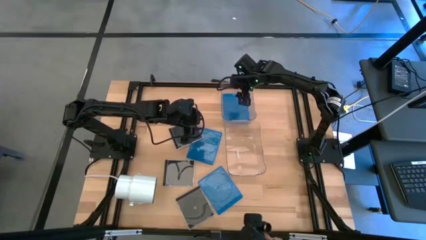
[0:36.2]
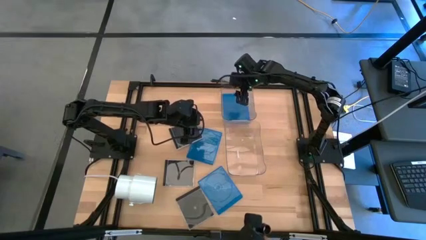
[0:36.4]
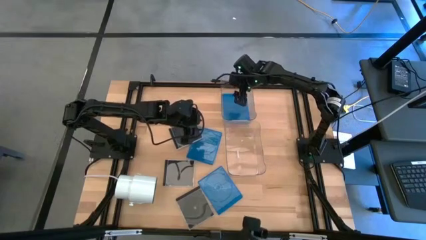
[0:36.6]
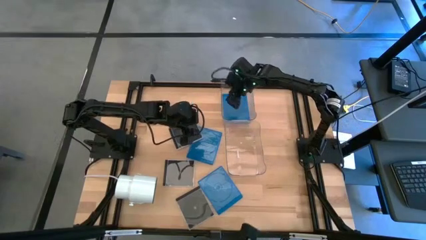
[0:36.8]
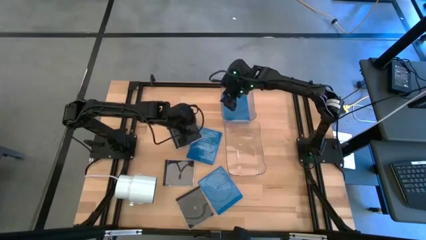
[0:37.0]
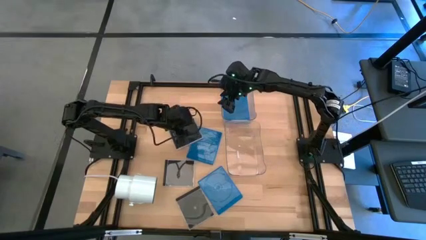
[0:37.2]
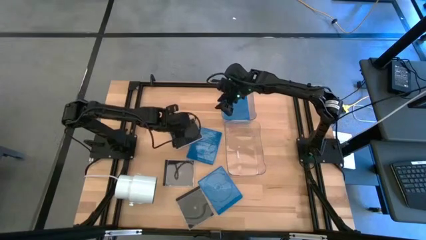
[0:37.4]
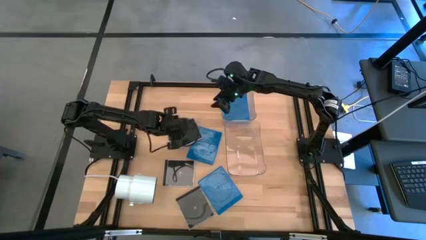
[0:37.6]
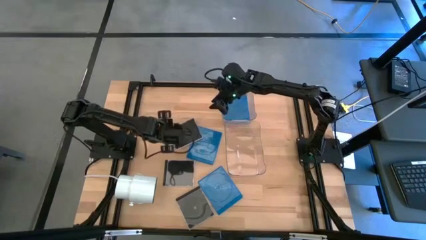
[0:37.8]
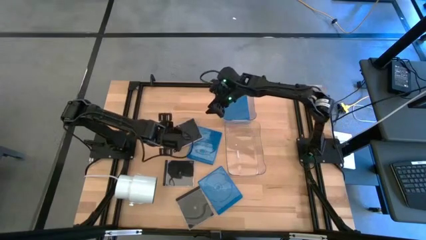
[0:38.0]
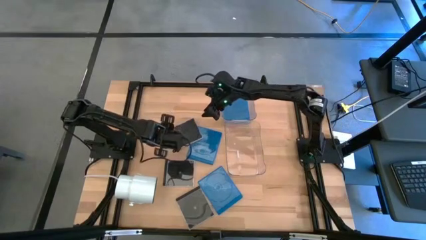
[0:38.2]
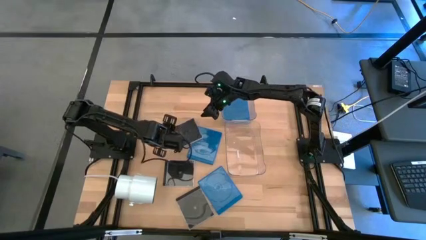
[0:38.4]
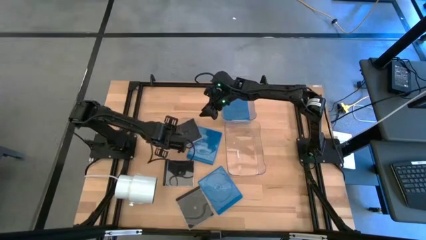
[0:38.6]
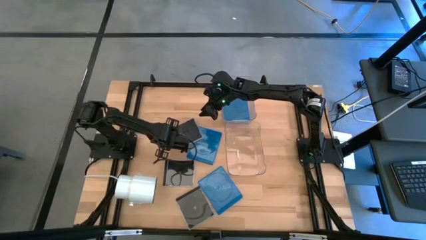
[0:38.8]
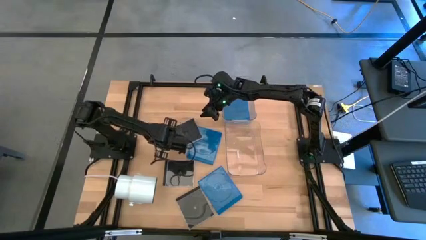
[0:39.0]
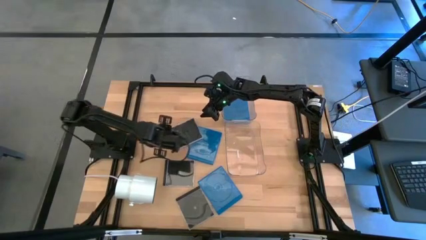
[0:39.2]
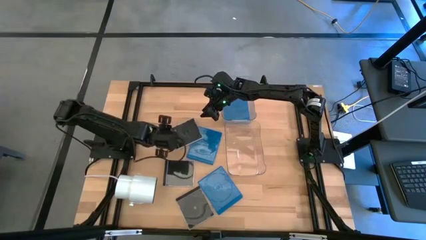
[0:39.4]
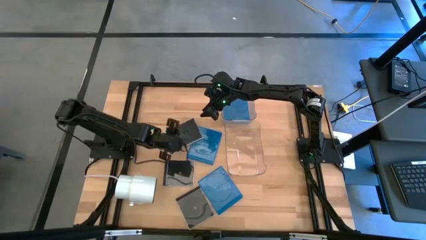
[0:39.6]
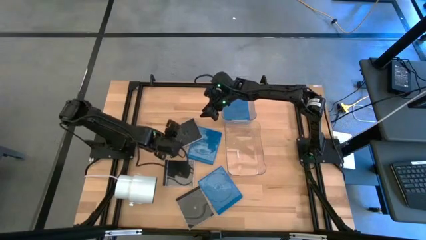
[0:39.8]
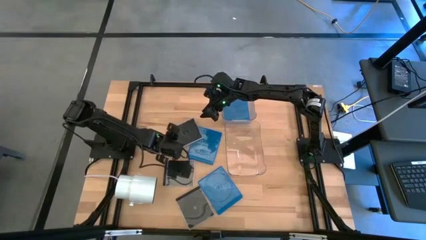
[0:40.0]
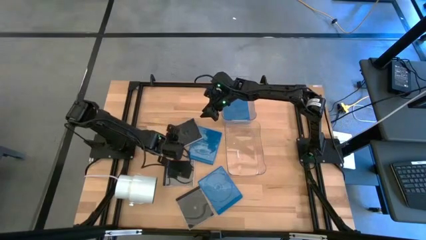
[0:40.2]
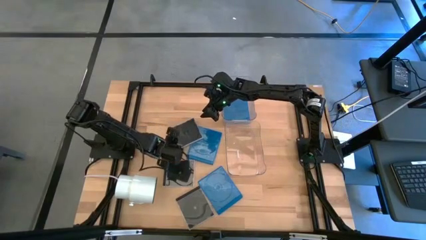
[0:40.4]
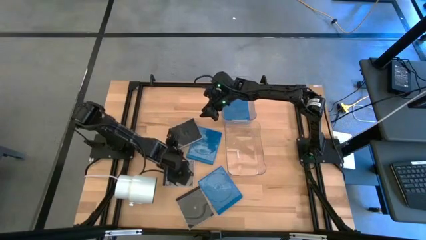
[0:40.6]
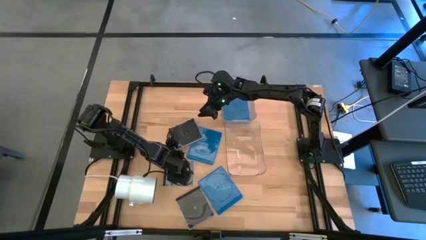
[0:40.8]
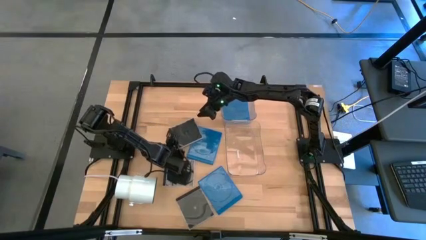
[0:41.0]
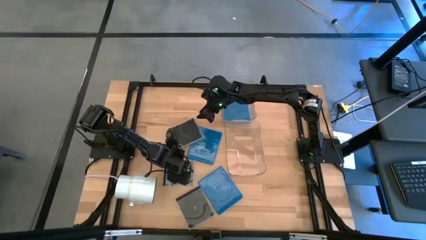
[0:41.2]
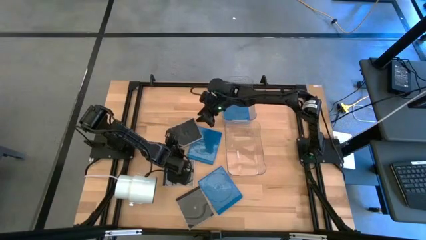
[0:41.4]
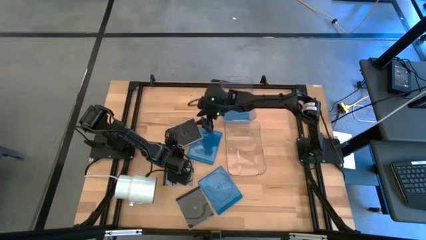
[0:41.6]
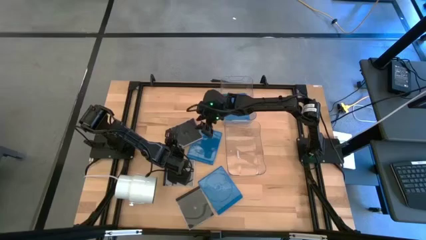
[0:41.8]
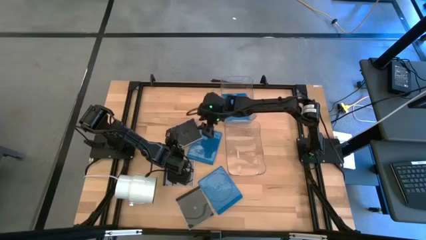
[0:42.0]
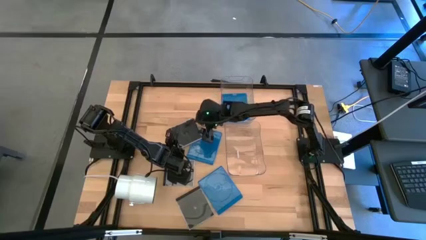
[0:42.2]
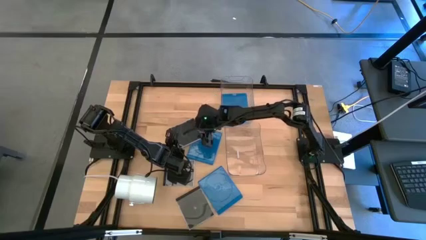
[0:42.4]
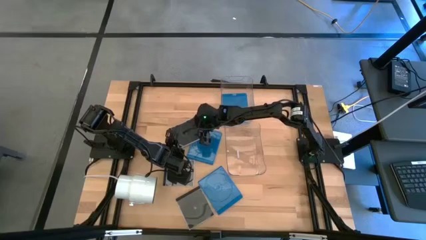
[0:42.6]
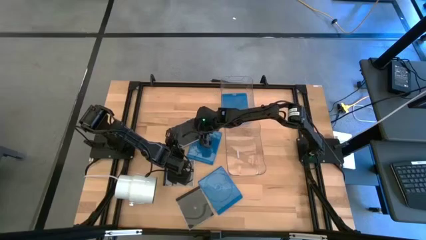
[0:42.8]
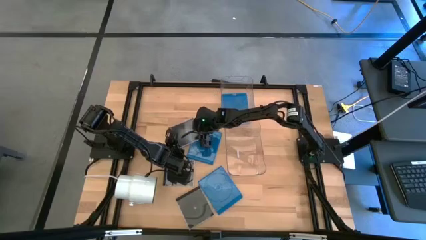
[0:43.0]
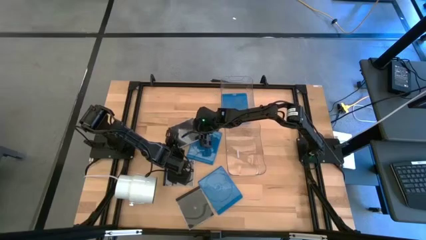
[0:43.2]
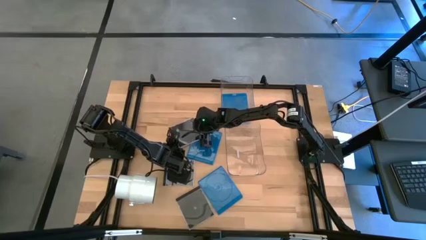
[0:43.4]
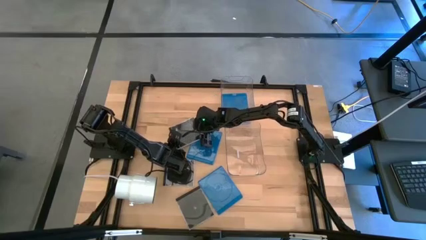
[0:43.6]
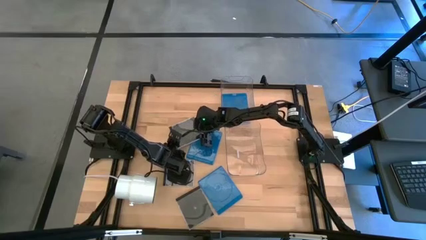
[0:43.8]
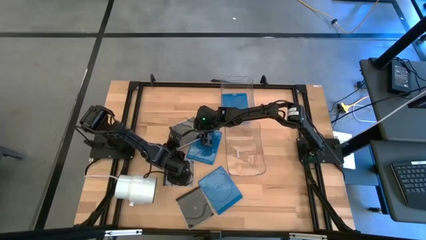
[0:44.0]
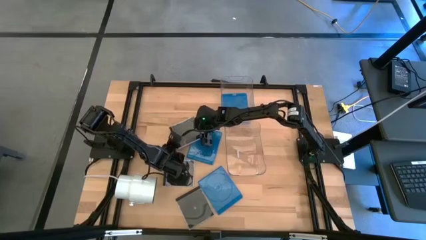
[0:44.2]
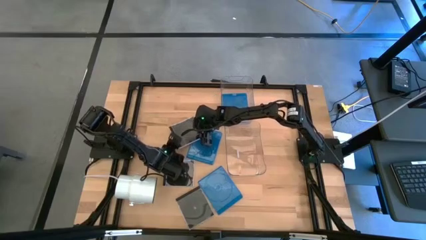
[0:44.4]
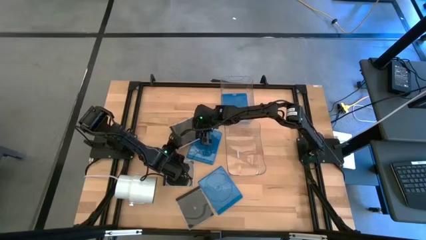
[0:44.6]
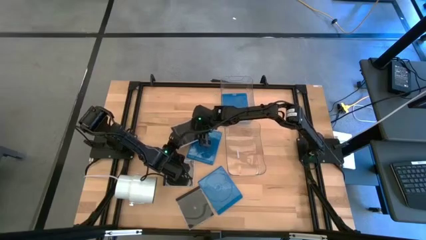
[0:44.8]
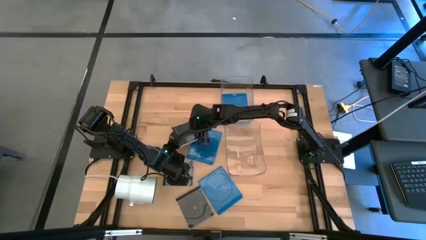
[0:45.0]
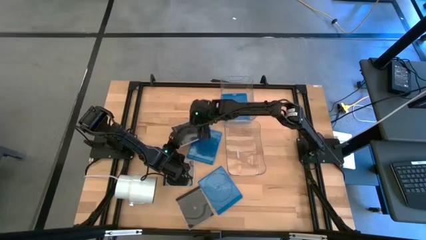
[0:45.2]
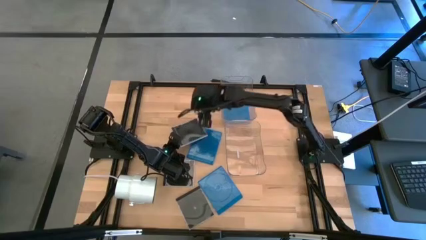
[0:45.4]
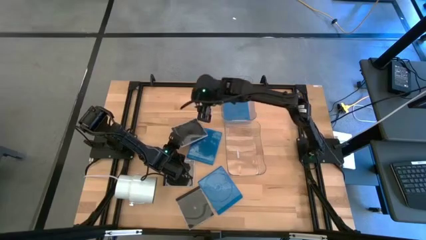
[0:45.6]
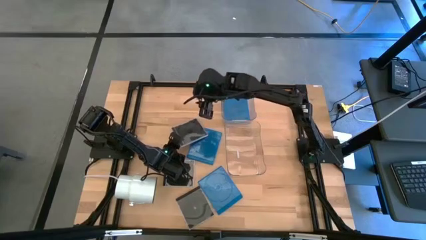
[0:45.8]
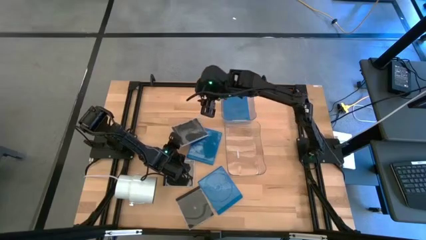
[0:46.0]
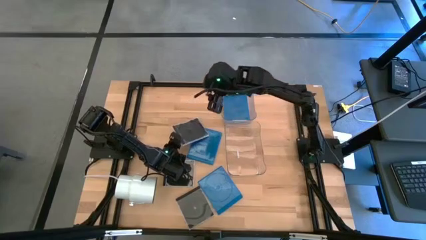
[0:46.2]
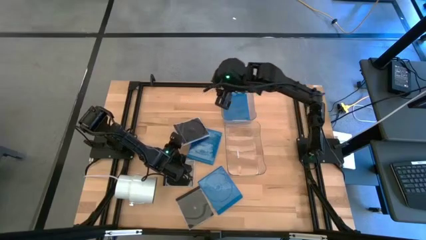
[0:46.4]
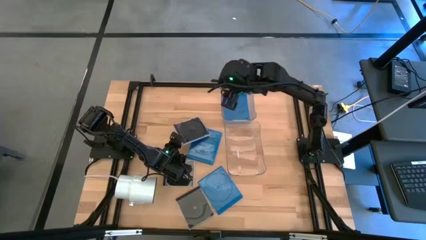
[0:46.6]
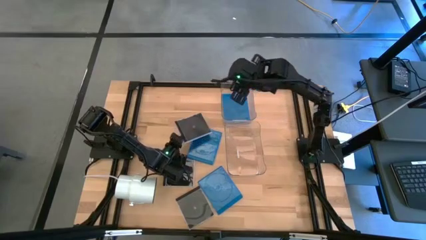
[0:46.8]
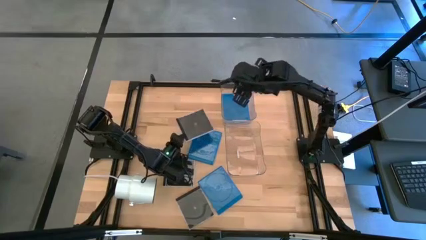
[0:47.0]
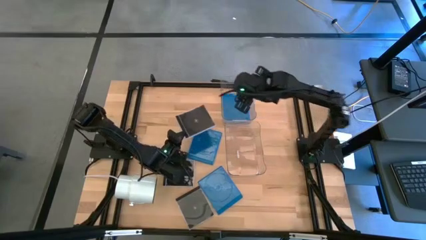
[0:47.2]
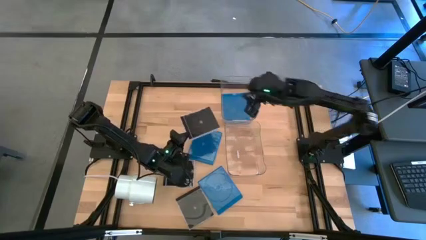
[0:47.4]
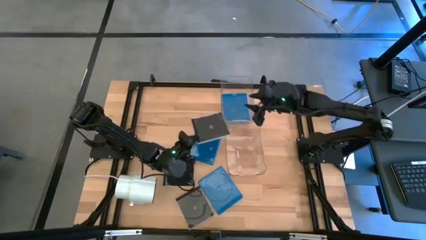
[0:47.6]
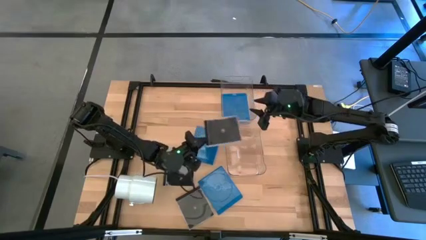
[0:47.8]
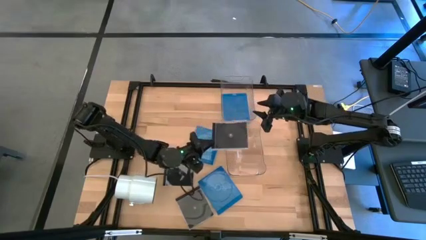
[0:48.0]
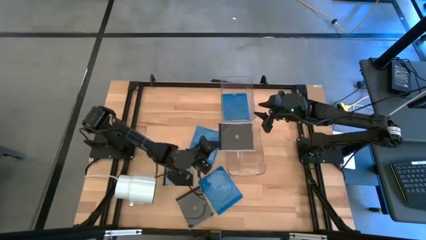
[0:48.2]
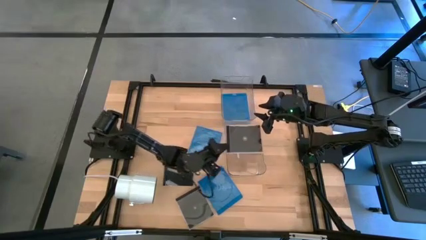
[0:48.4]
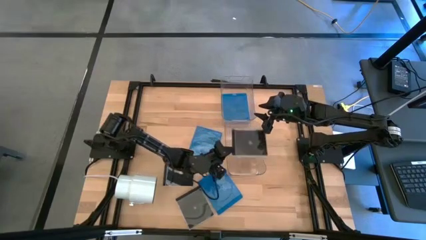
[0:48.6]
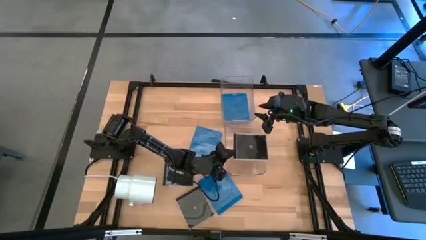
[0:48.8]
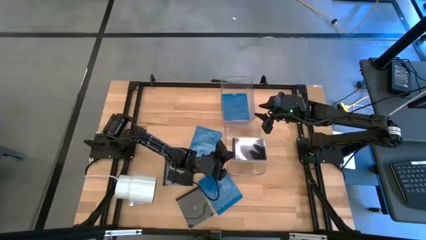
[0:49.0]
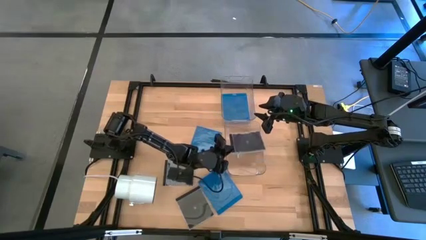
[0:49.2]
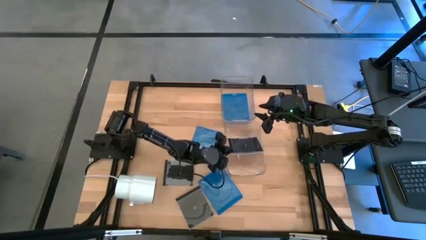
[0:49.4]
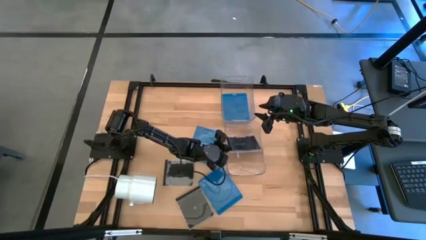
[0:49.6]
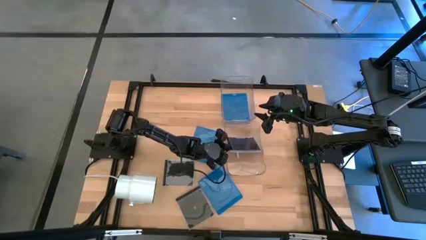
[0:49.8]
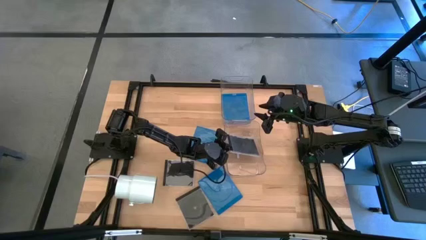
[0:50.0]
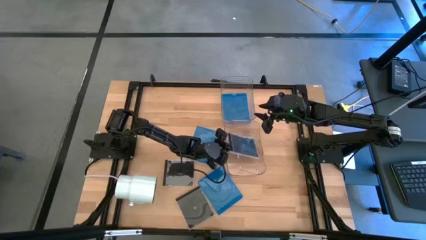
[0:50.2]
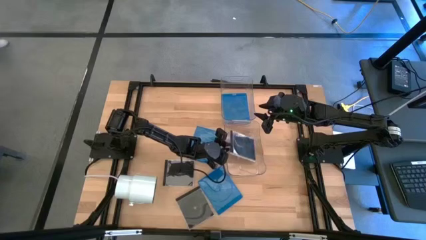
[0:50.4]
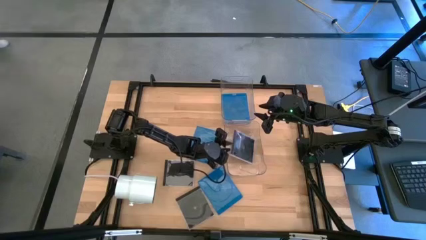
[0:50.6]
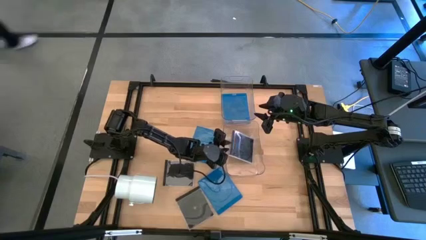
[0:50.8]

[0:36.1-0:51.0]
Task: Pick & place jewel cases by type
Put the top black CD case into the bottom transparent bin

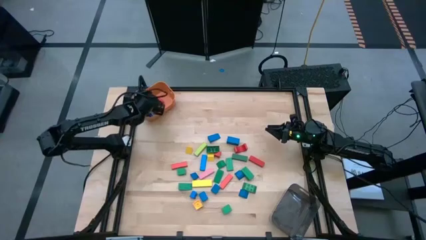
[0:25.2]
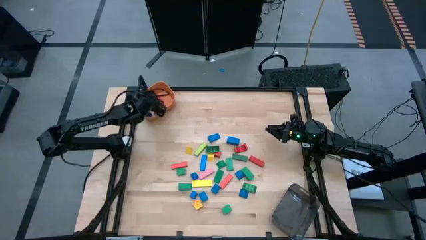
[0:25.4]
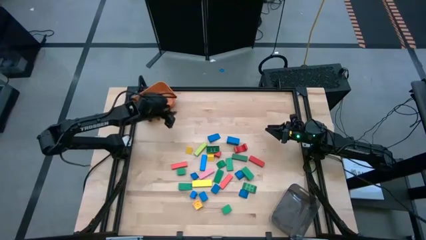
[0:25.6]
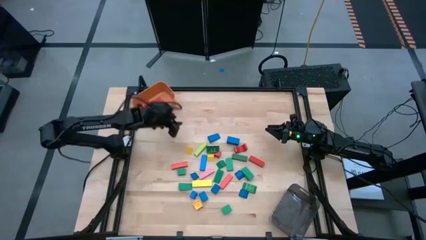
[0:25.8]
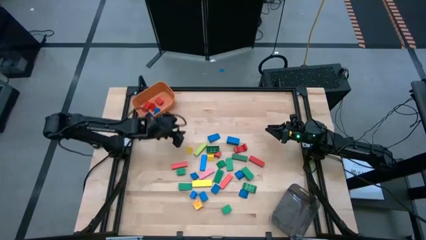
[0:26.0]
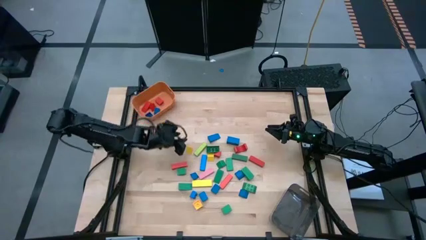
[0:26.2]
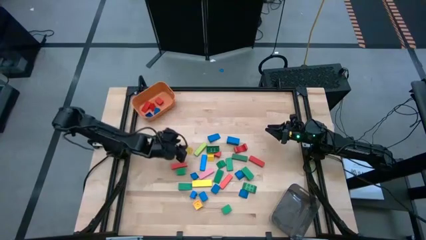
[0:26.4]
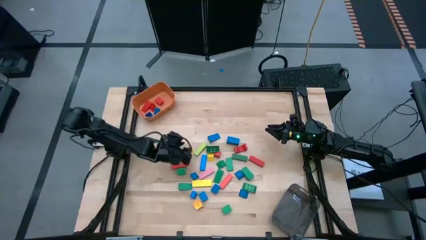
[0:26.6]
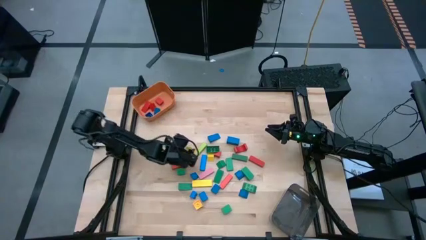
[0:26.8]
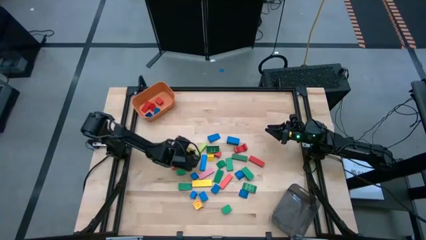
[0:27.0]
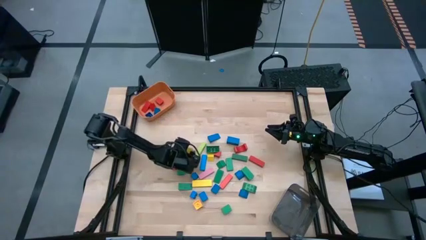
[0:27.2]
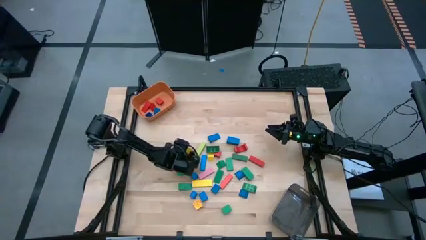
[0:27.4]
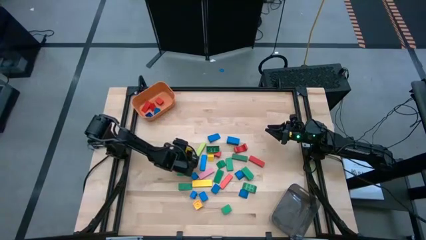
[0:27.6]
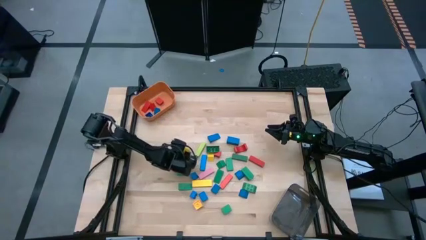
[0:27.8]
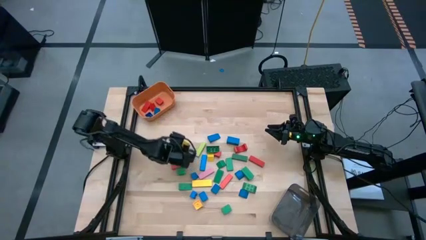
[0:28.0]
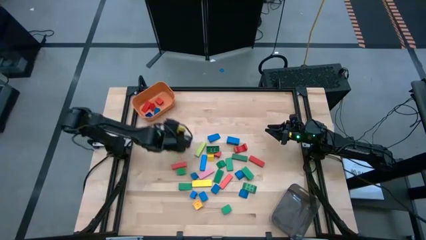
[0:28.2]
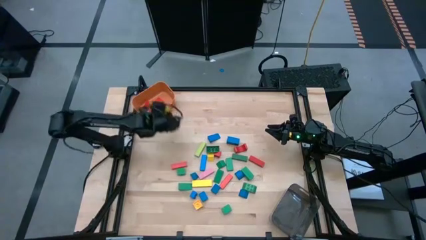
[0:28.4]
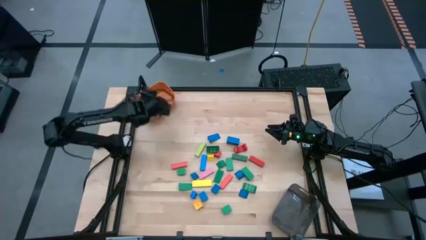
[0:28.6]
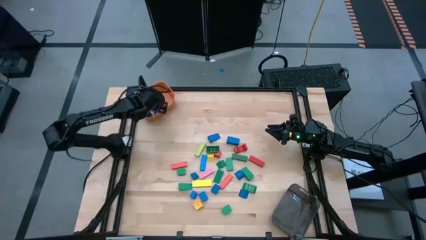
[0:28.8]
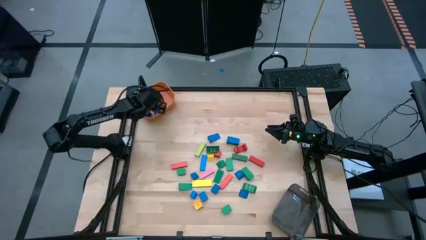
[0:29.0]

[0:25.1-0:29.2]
Task: Sort blocks by size
Put the small yellow block into the orange bin
